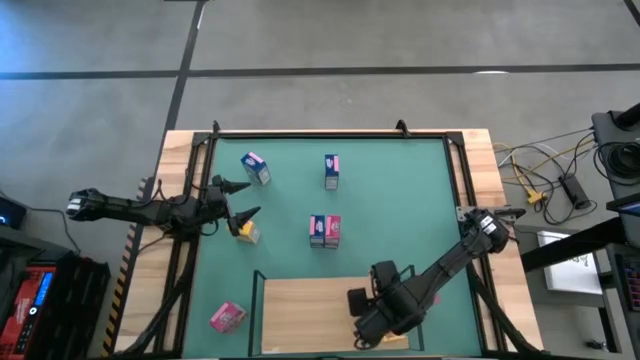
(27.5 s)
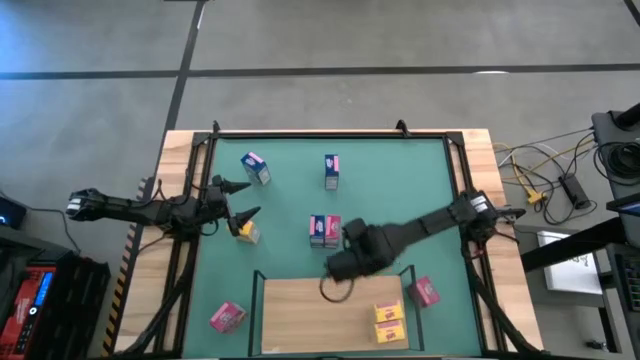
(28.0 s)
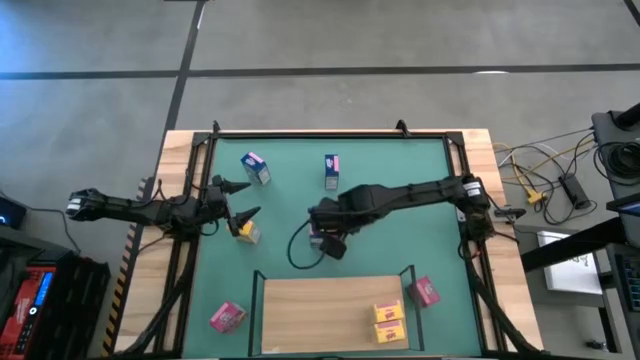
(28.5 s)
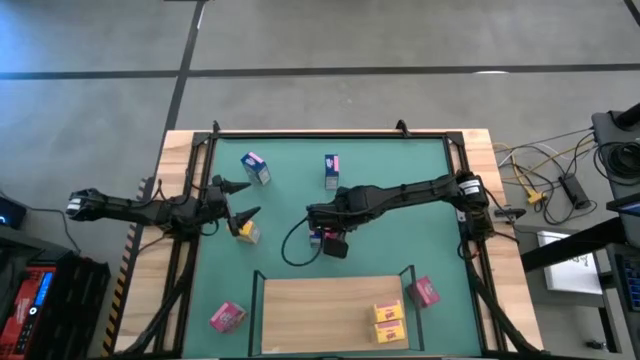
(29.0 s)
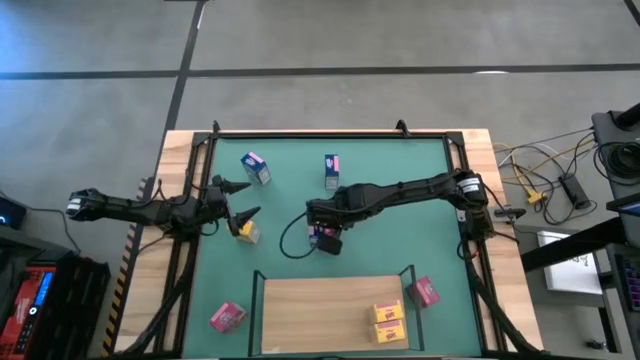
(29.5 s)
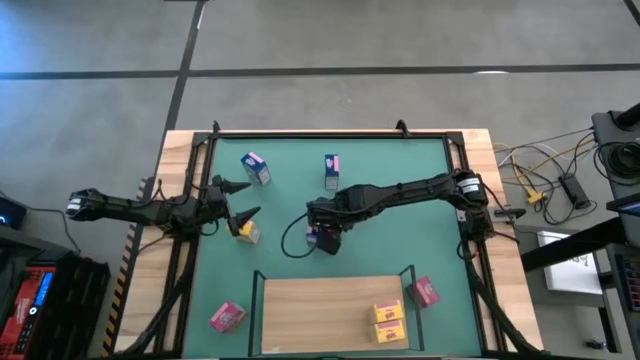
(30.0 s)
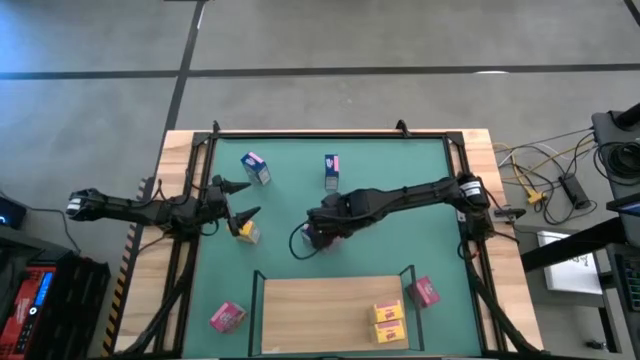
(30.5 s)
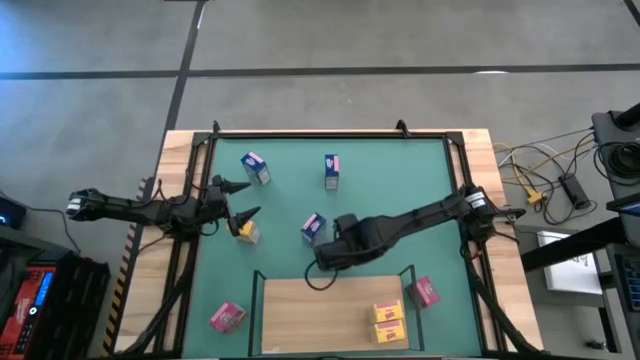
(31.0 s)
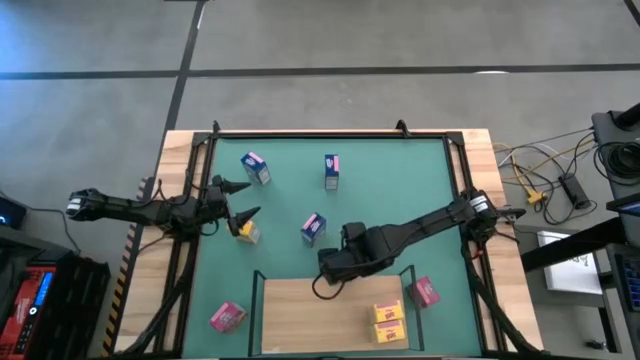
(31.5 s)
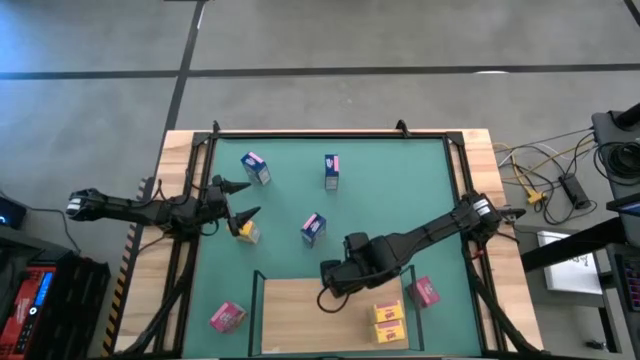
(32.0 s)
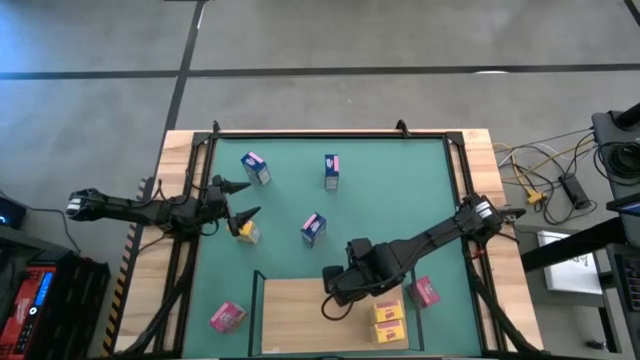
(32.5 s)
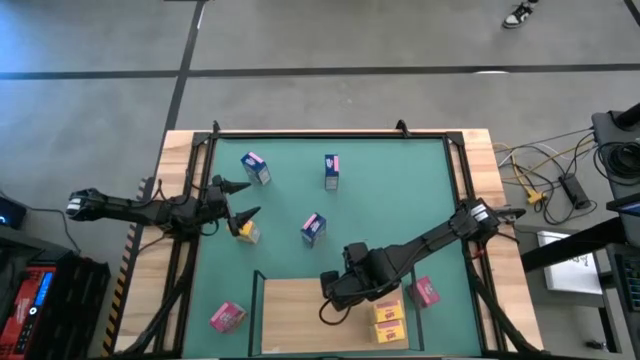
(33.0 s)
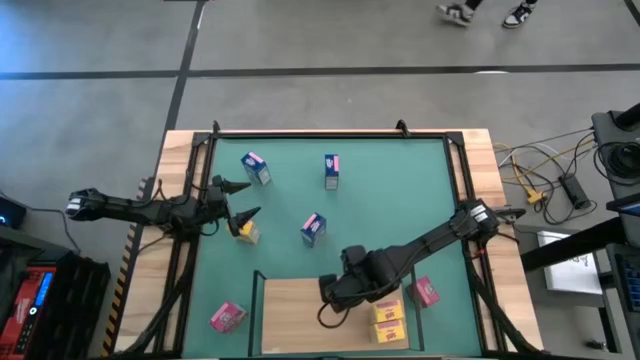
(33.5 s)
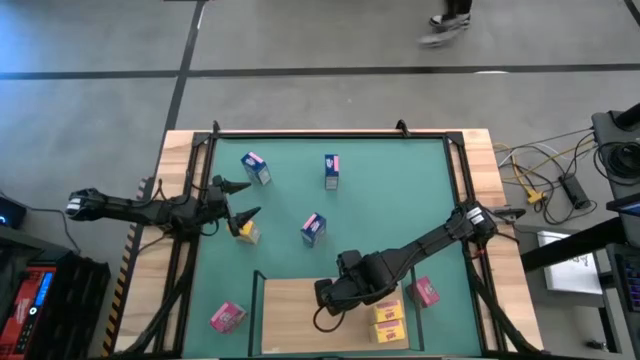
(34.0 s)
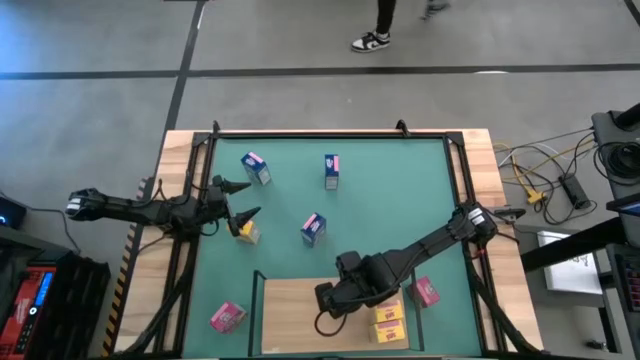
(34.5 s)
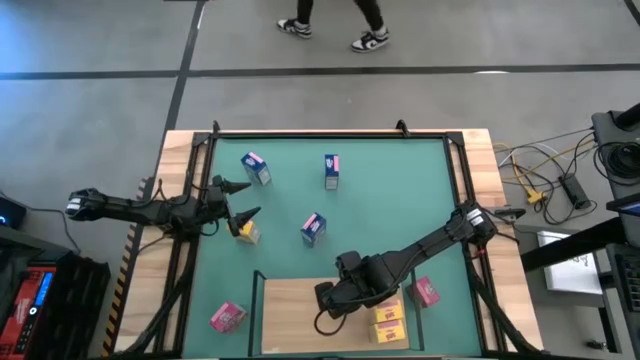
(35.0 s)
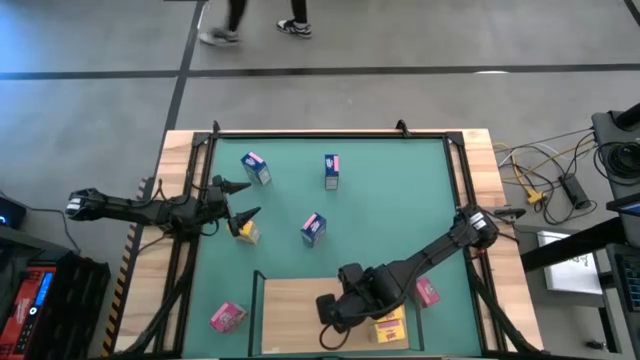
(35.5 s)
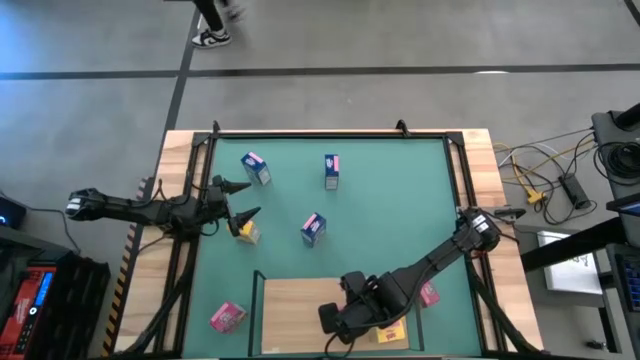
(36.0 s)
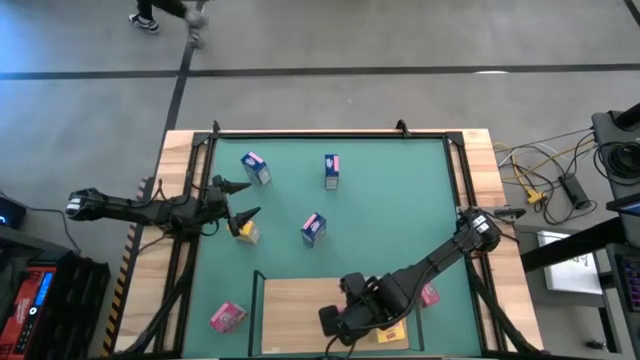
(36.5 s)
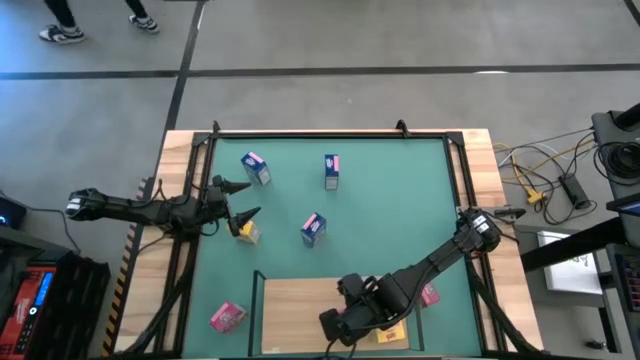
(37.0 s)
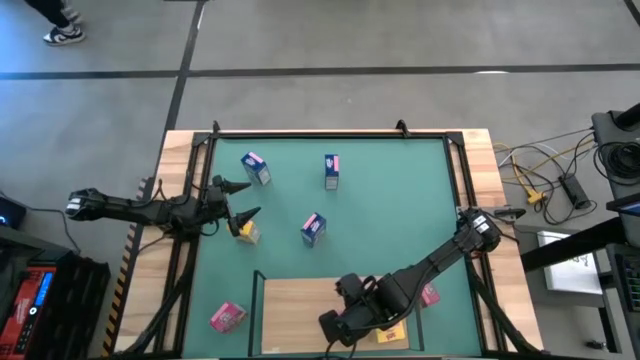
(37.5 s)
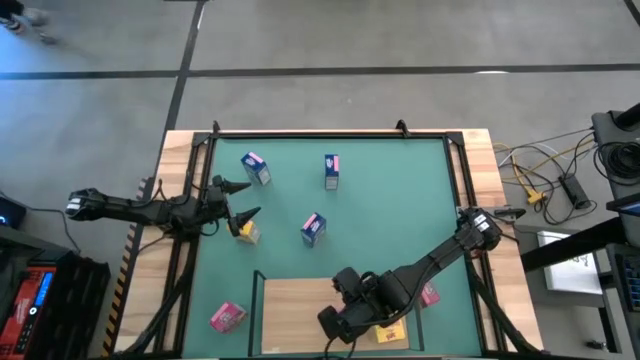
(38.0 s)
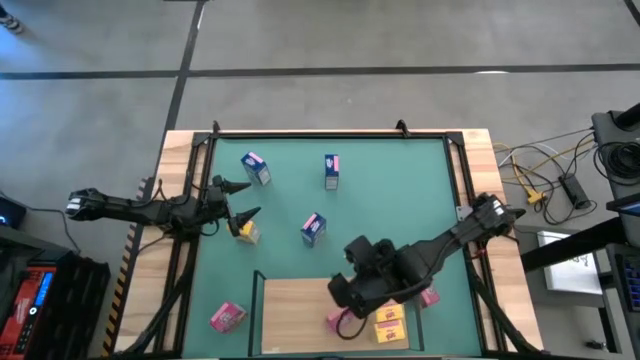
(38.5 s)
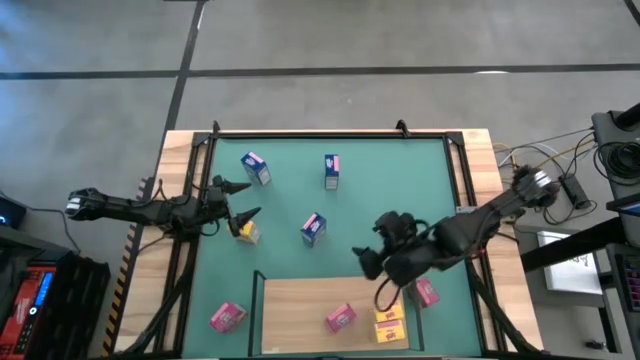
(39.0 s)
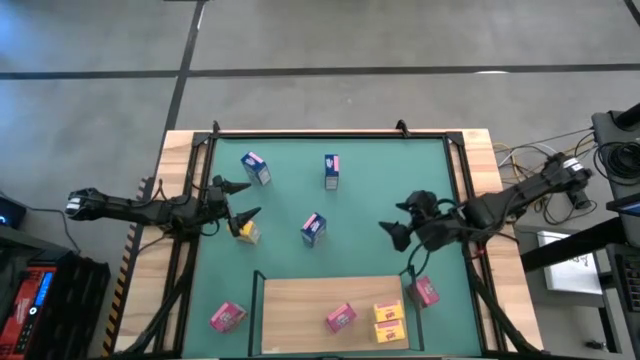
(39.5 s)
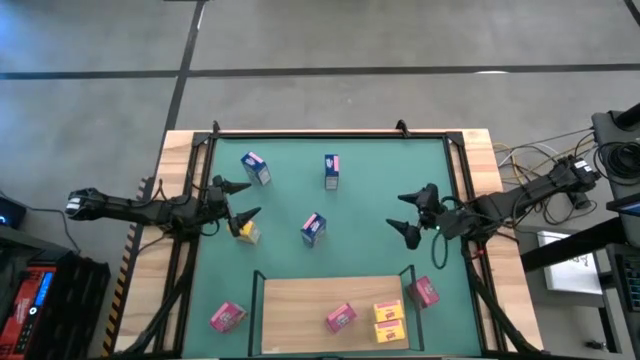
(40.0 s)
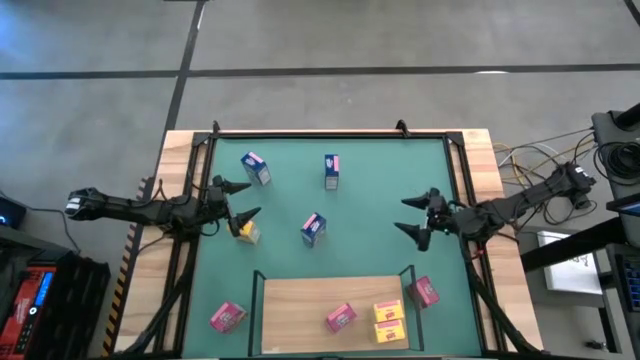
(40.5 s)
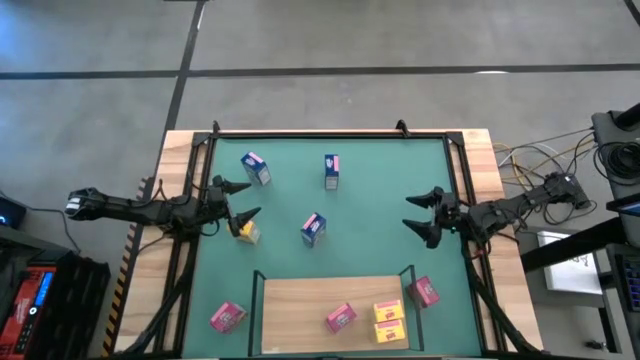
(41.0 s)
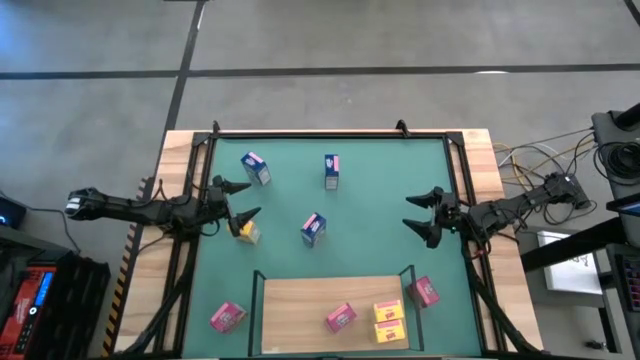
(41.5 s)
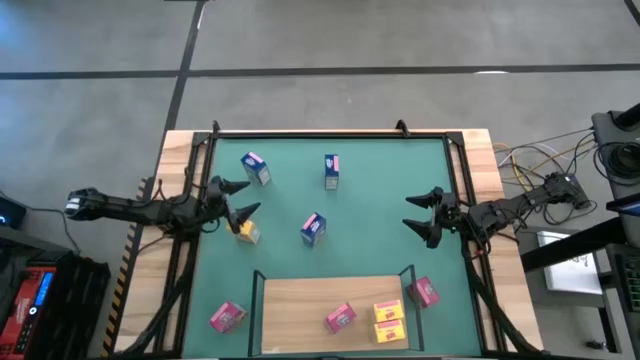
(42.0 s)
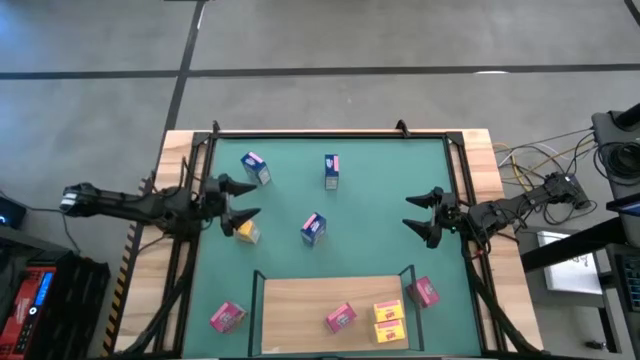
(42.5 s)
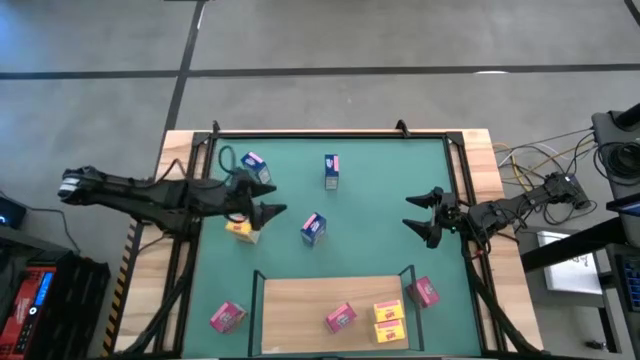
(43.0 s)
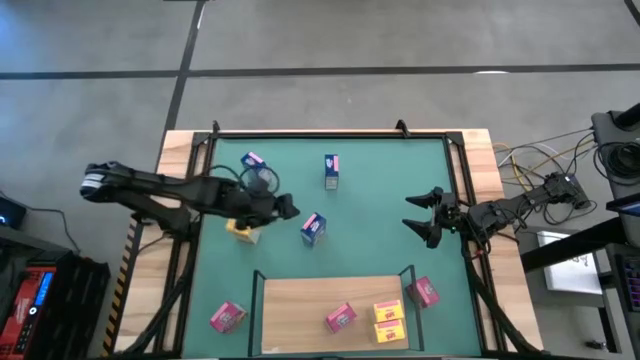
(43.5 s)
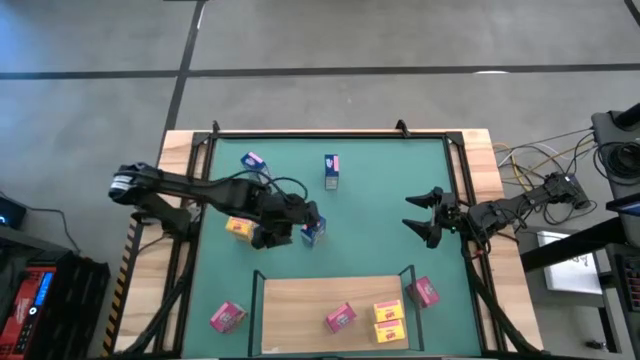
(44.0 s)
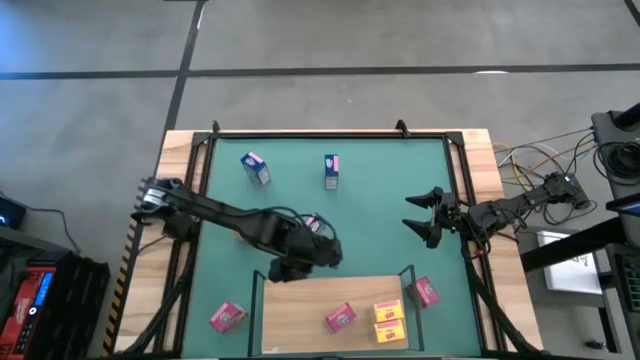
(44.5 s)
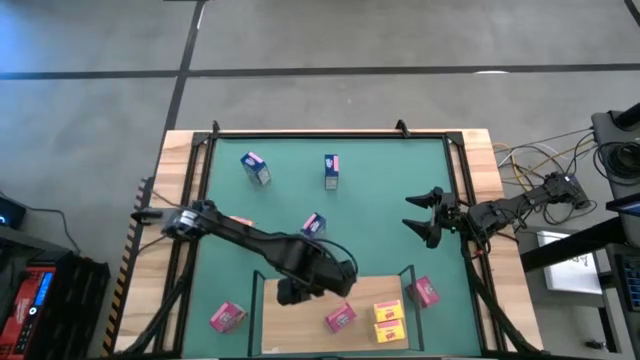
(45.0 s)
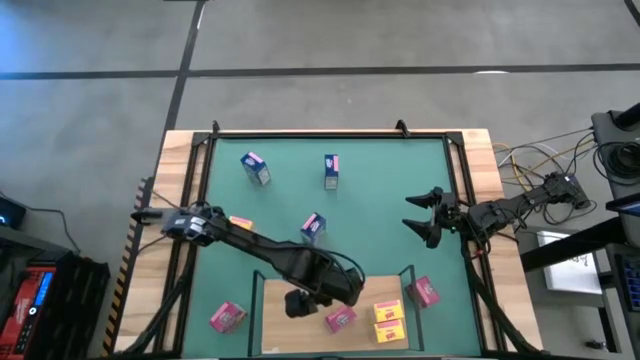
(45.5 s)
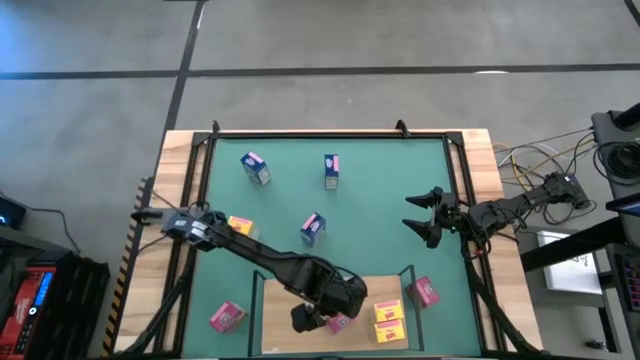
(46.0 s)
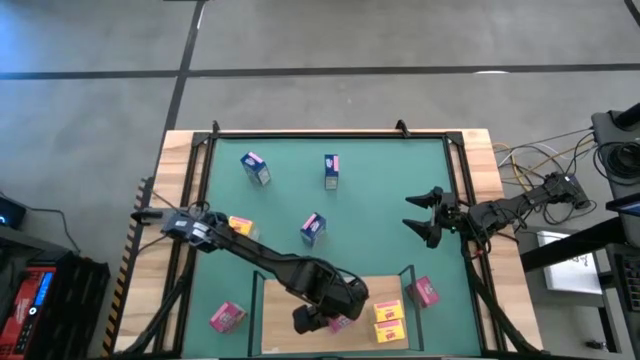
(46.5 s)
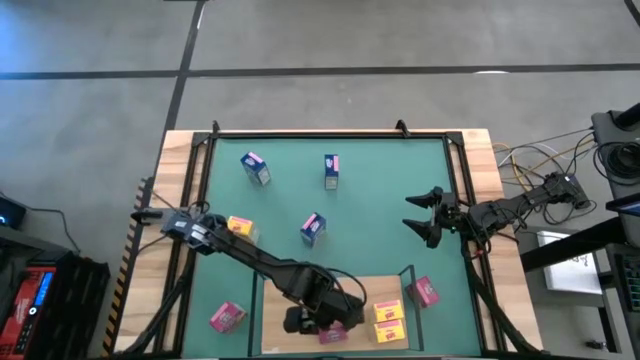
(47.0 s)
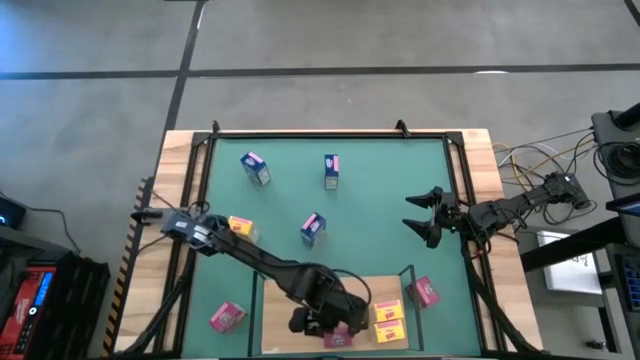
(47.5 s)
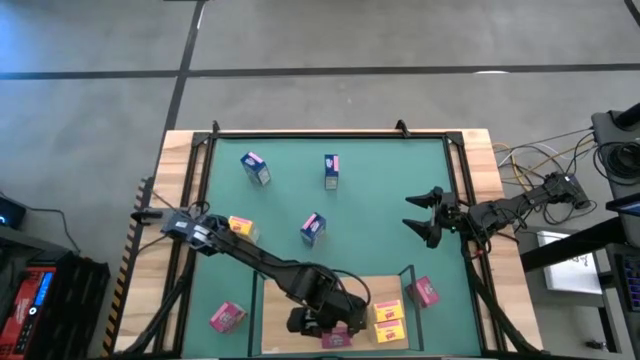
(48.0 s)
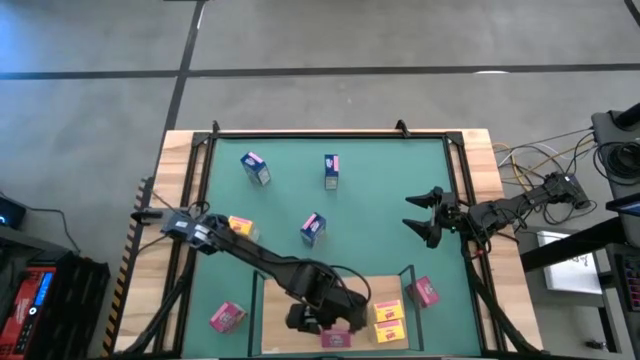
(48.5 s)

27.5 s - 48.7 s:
Task: Stack cereal on shelf
Put the top violet cereal box on the shelf
